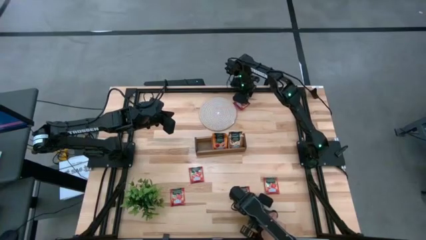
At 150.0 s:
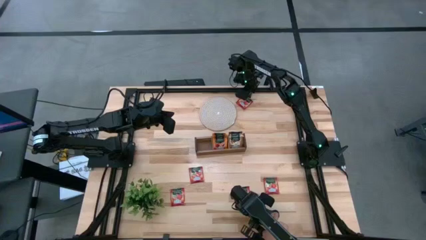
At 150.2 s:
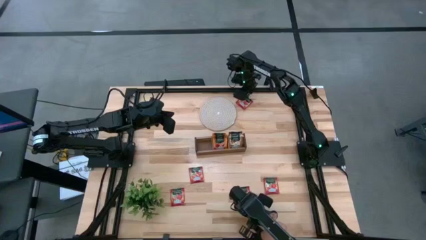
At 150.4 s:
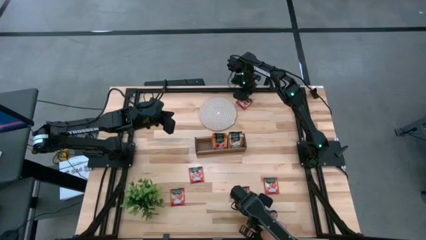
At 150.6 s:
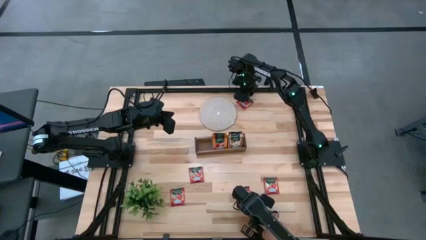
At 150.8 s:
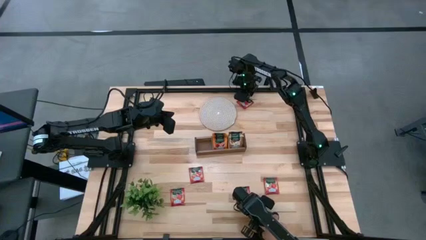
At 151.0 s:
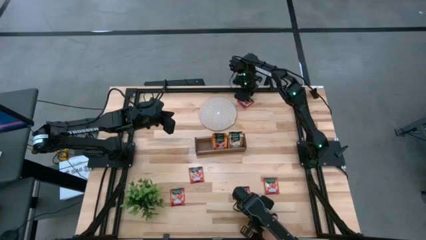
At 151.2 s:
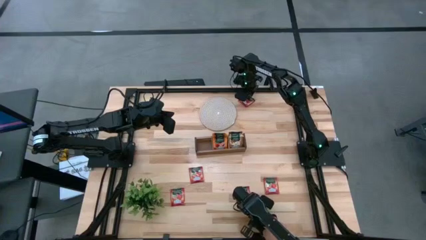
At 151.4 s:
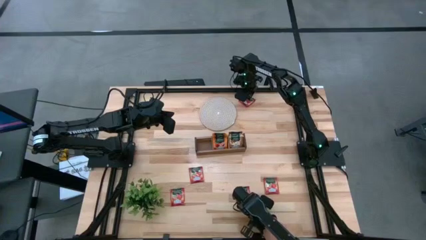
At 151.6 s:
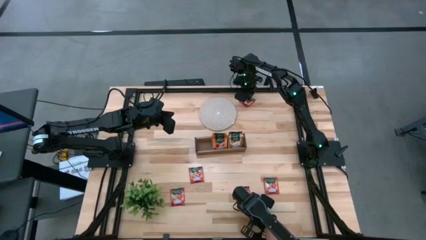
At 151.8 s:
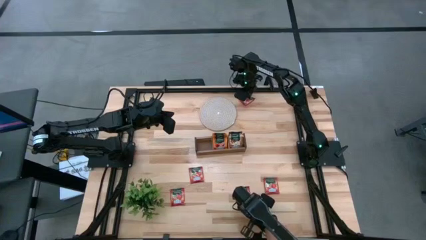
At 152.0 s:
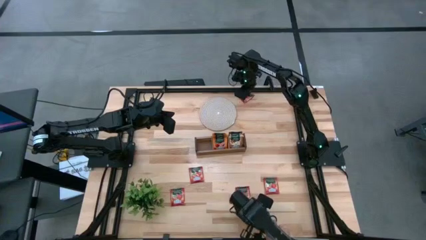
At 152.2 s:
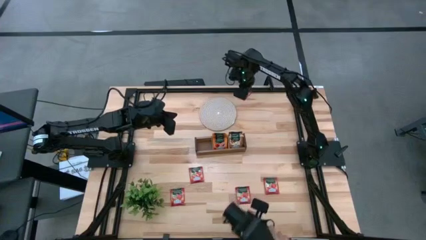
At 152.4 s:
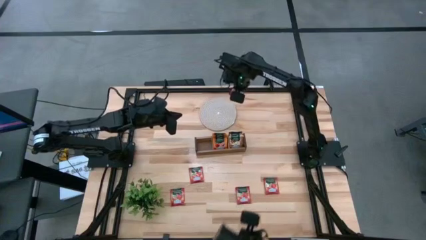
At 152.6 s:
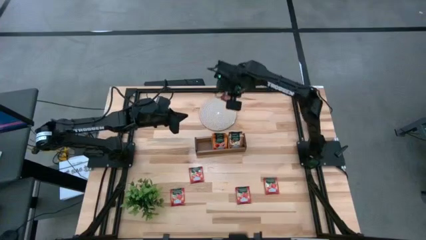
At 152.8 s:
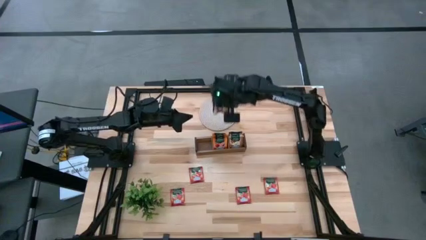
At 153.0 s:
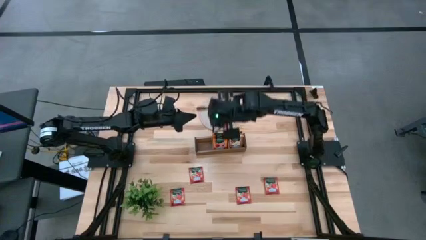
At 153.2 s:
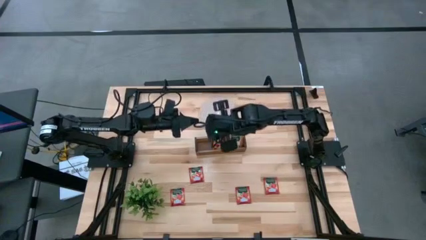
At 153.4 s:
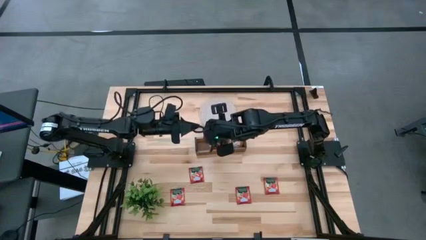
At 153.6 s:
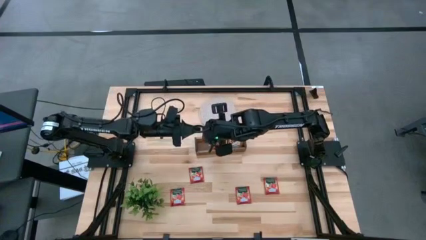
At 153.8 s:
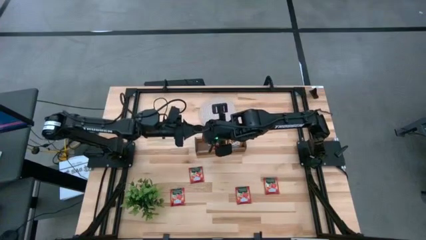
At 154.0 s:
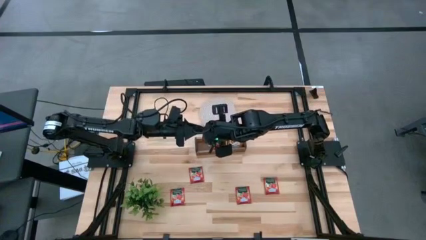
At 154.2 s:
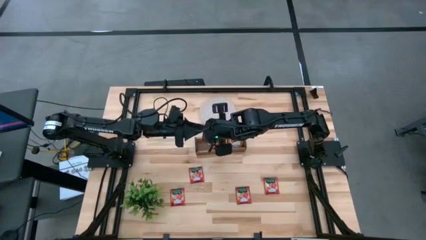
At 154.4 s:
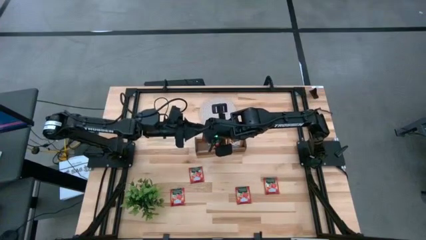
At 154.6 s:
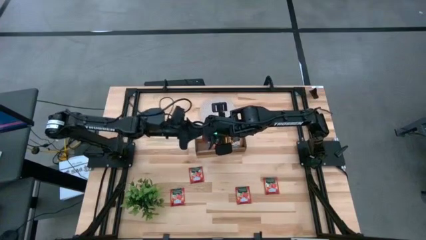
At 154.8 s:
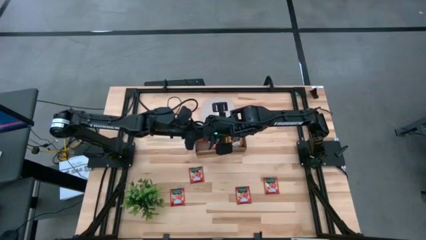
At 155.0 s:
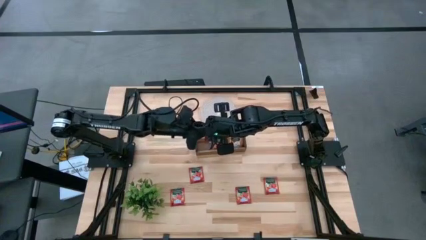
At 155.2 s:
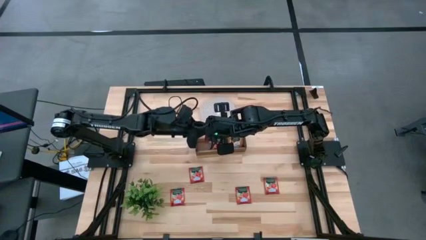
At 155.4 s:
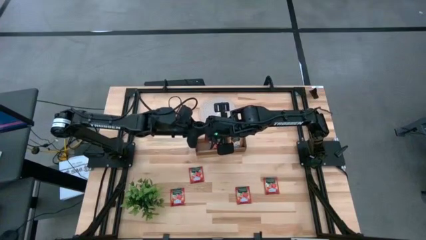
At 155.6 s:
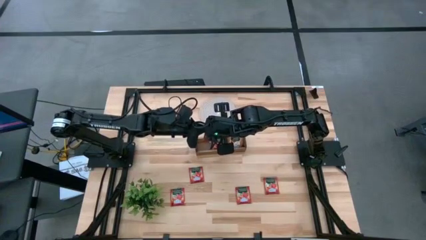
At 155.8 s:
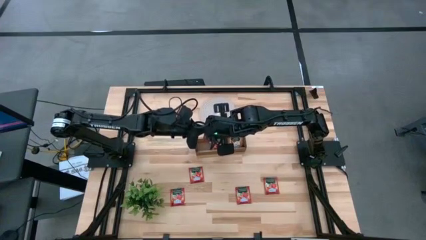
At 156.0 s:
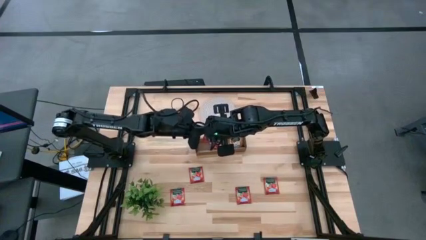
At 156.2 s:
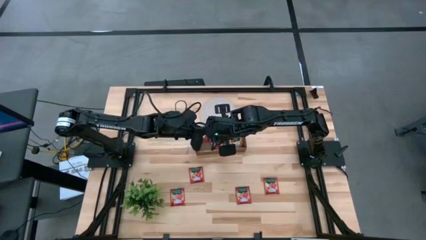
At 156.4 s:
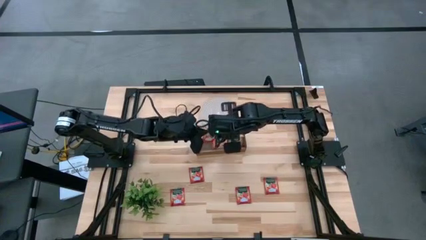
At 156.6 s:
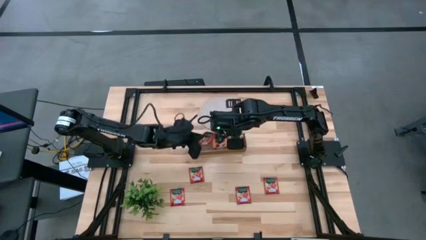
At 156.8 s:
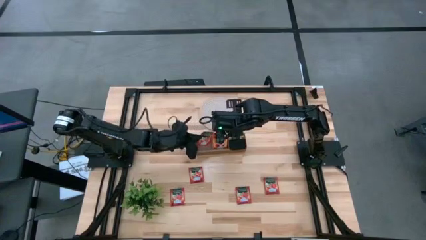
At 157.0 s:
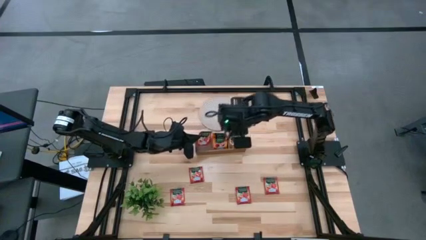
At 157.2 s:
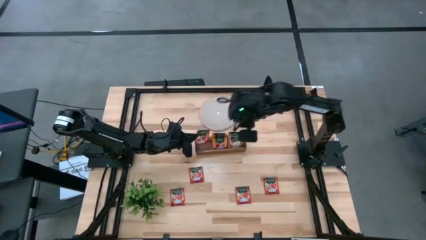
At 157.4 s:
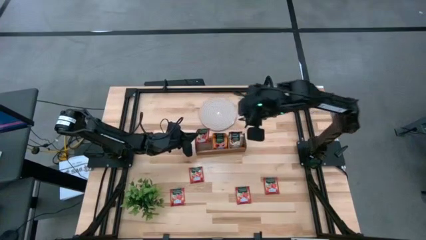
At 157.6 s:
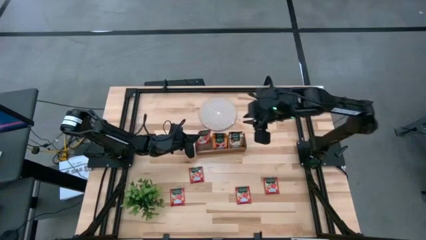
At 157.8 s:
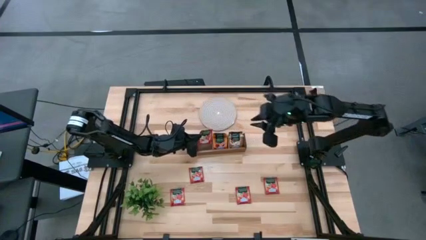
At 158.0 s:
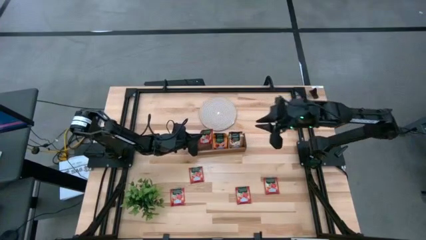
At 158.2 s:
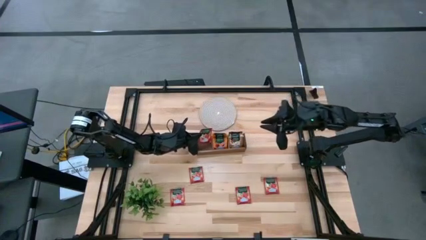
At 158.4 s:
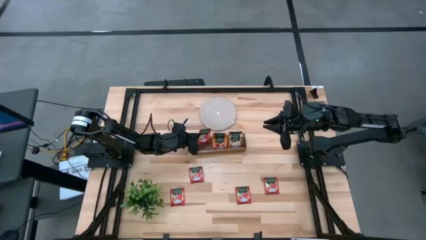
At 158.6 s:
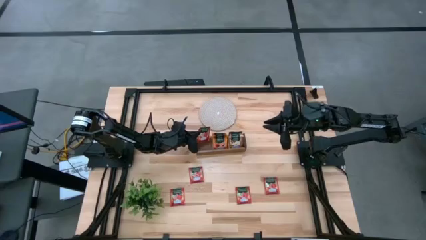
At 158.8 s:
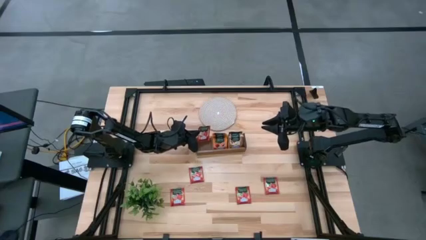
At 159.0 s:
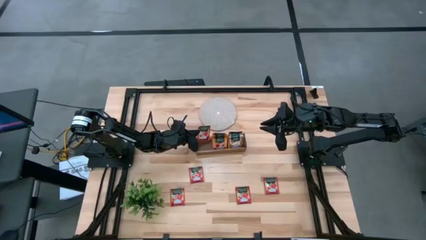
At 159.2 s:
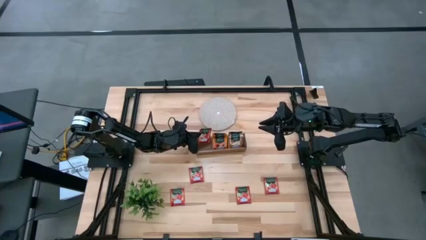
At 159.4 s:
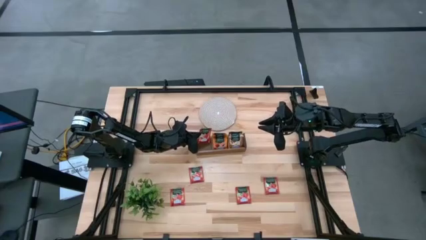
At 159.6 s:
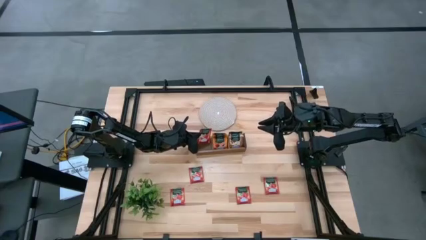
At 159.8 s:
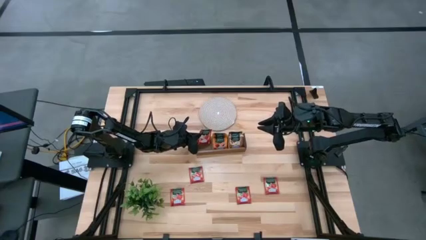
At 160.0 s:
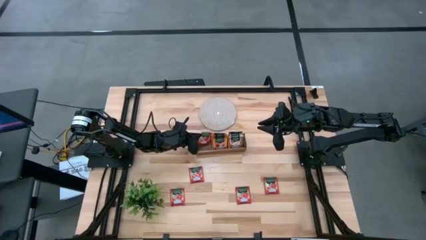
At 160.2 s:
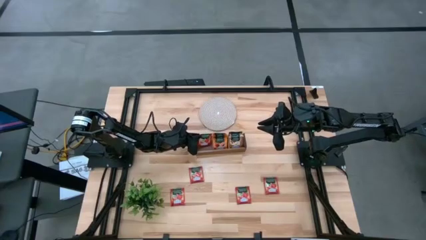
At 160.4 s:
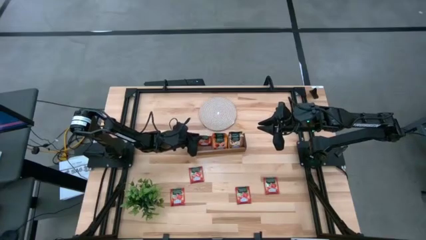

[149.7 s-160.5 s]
Task: Pick & Place Tea
Put the red tea bag into the left section of the wooden organizer

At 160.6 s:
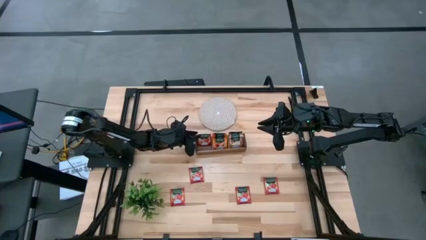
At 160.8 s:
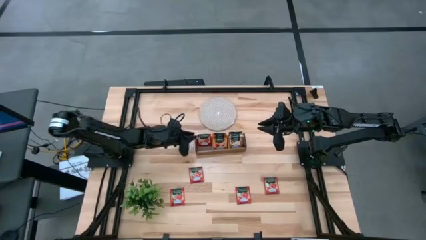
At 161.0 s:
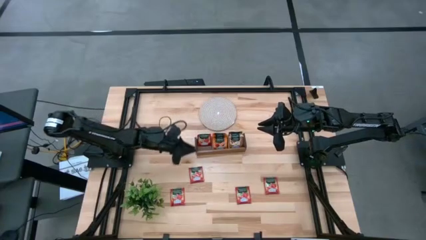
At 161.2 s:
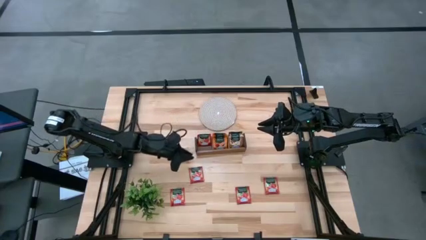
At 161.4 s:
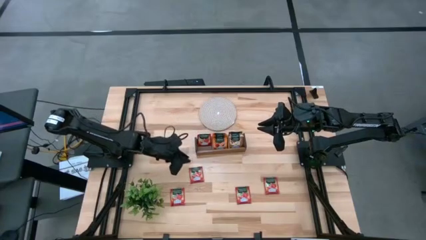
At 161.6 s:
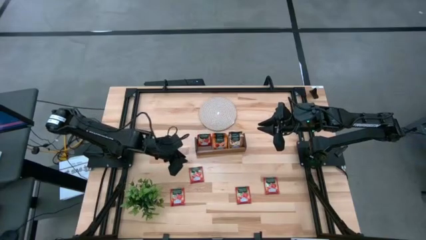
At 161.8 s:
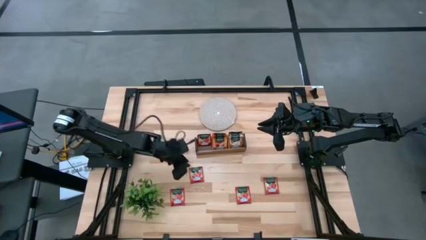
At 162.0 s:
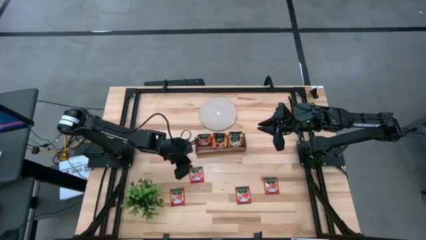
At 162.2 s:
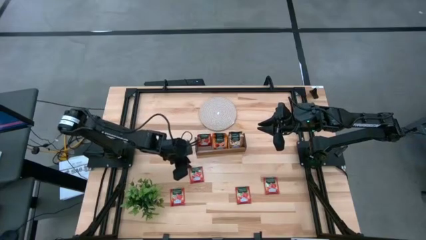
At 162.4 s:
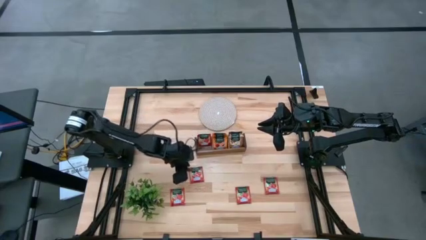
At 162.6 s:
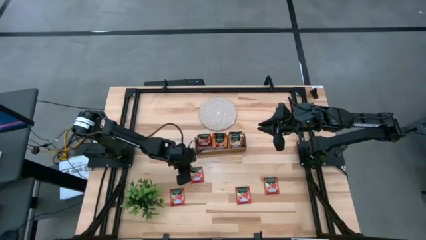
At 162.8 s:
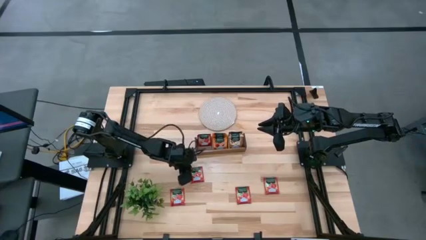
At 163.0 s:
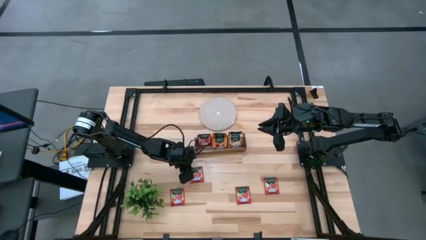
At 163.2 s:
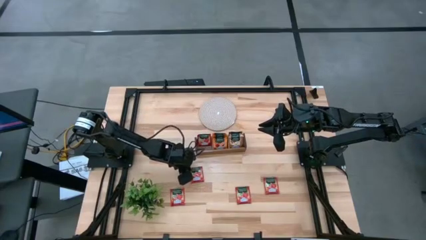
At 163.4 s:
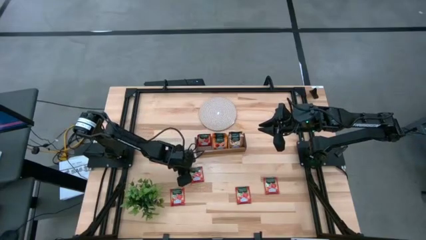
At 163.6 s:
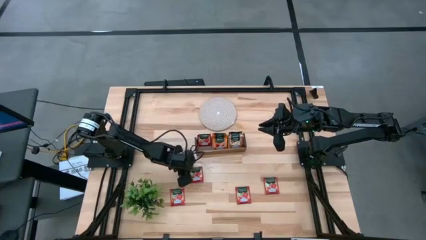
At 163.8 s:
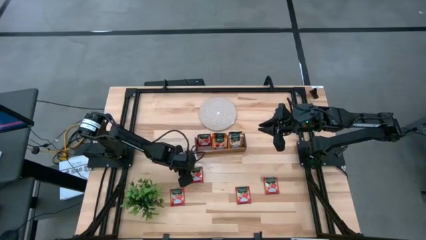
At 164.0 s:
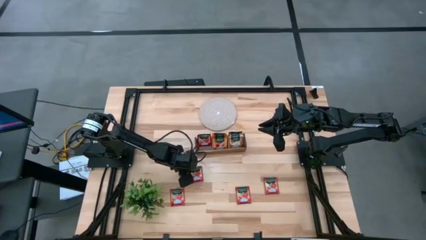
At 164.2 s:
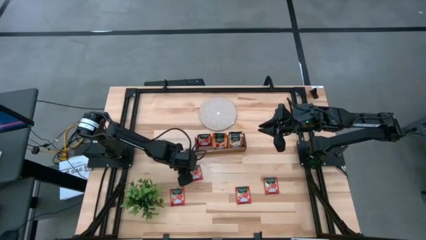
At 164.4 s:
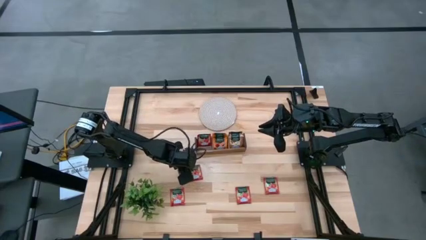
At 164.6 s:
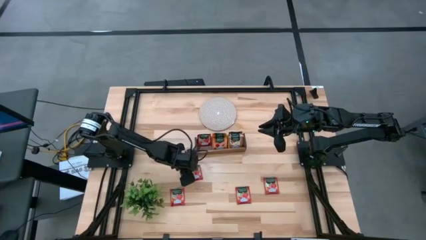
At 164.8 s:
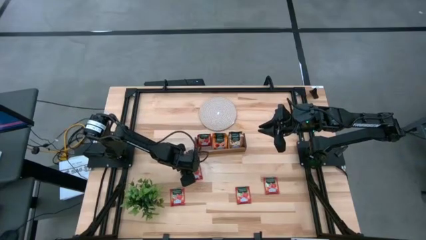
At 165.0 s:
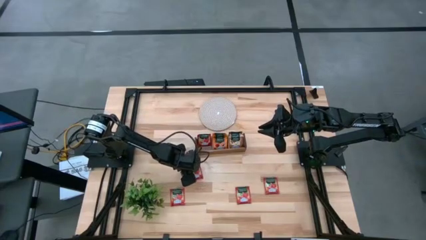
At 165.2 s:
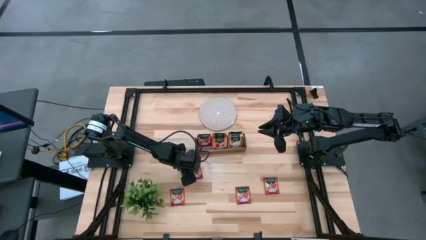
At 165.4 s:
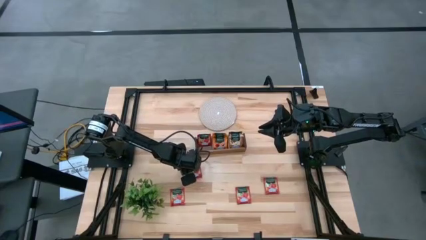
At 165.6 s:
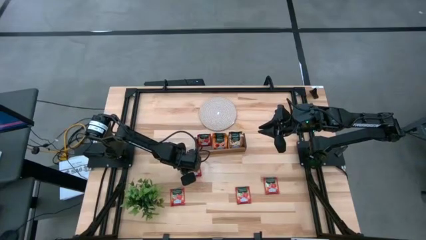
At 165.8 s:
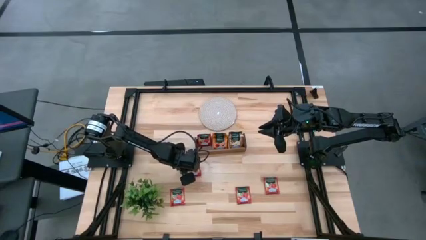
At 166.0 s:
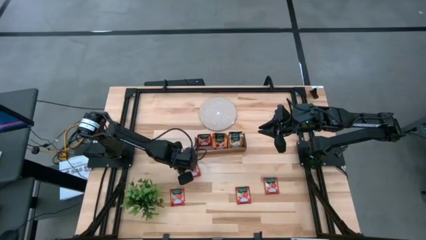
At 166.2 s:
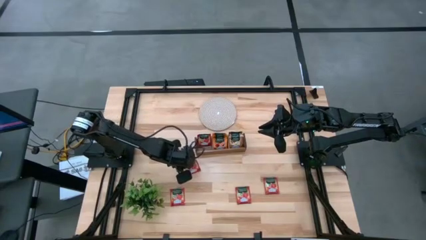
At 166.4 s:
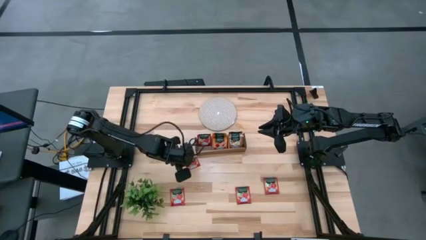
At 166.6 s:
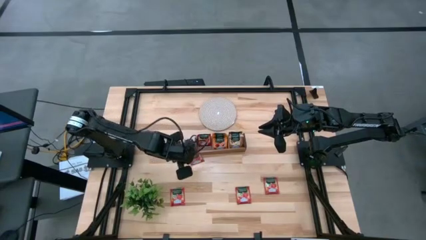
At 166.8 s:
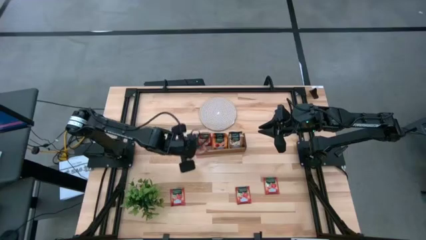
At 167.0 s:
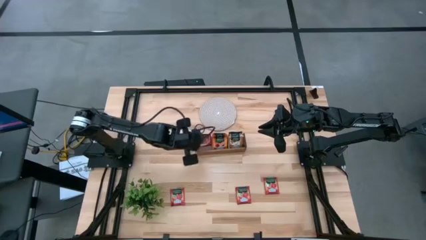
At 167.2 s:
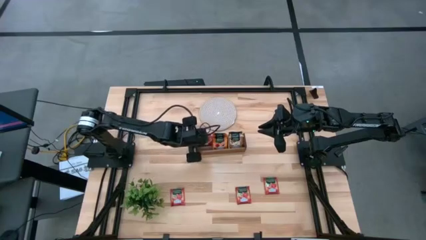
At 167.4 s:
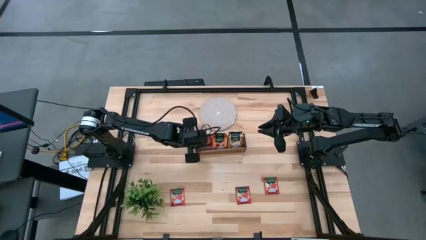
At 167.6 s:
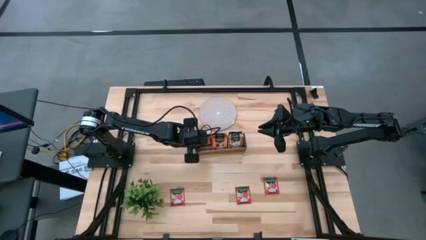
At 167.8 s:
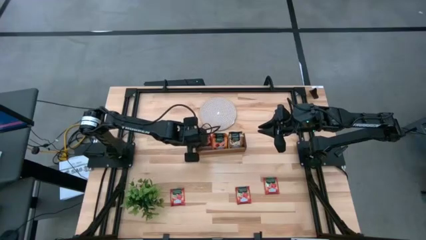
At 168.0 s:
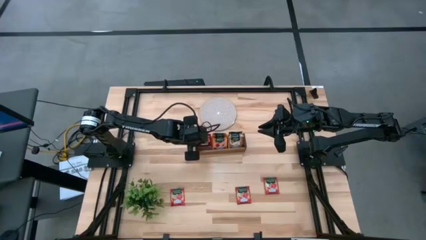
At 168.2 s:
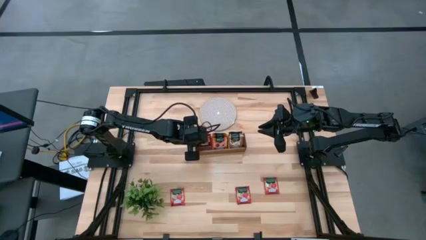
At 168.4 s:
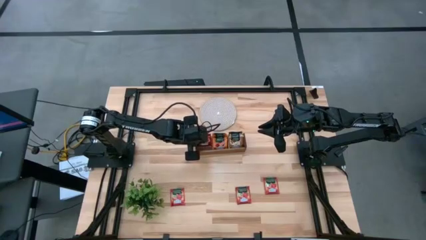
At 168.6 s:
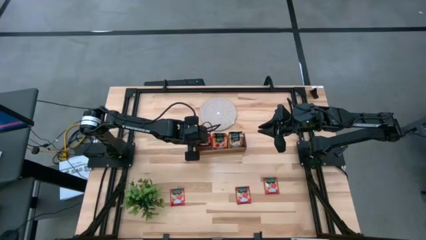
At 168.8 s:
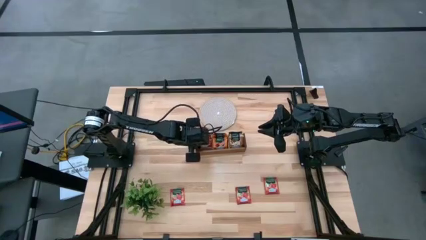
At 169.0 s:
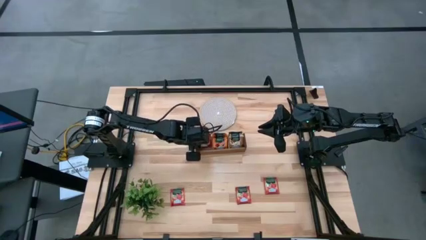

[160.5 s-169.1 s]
Put the red tea bag into the left section of the wooden organizer
